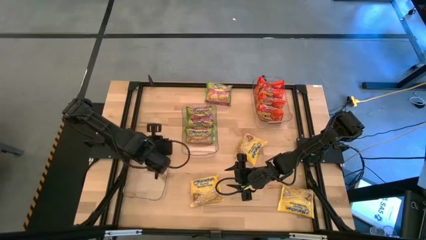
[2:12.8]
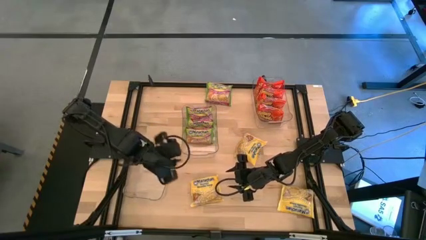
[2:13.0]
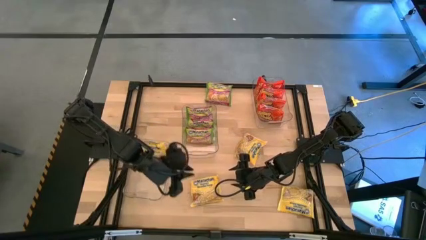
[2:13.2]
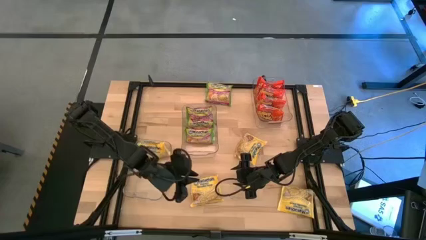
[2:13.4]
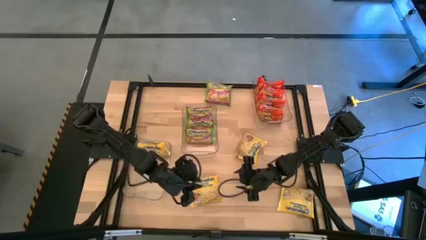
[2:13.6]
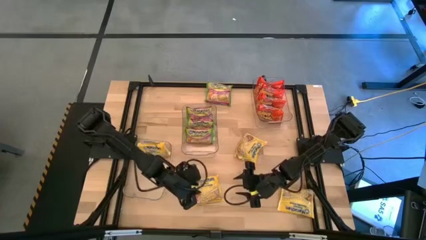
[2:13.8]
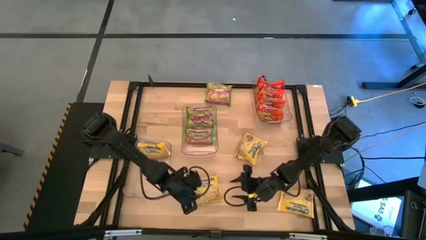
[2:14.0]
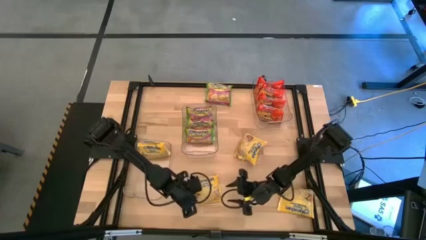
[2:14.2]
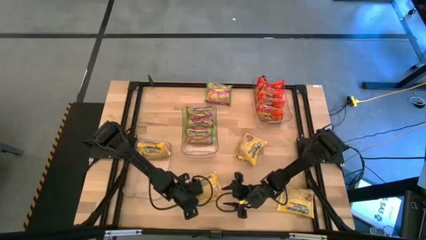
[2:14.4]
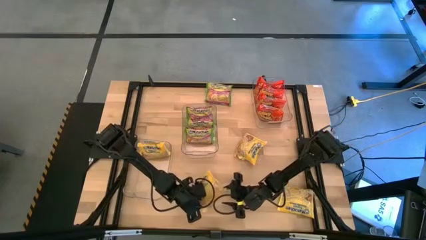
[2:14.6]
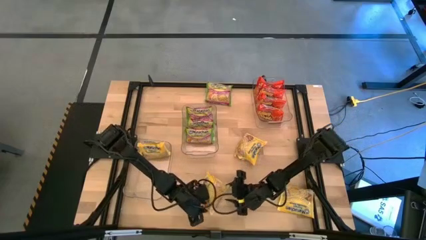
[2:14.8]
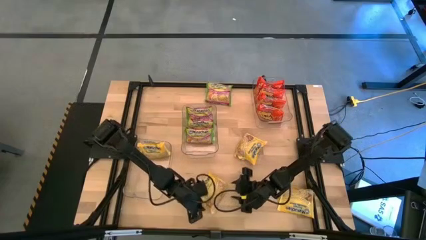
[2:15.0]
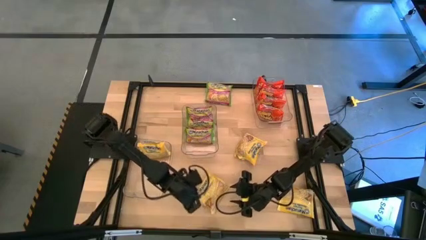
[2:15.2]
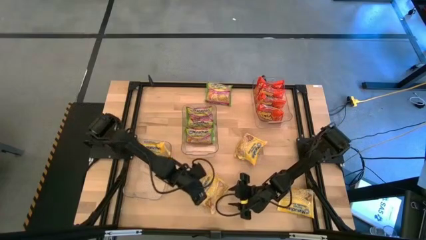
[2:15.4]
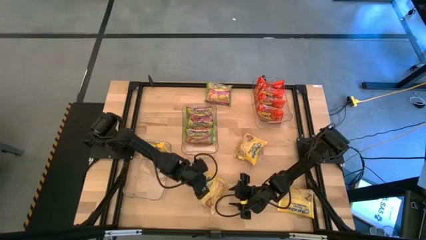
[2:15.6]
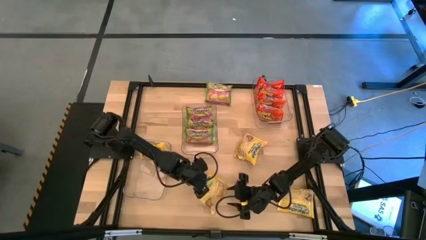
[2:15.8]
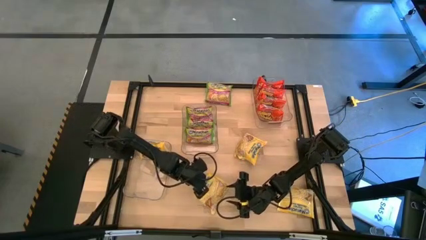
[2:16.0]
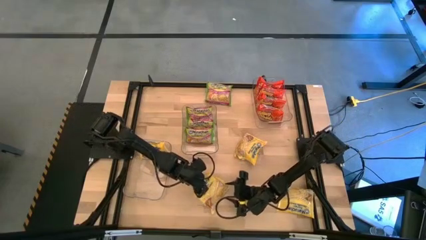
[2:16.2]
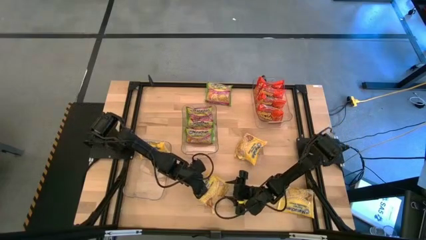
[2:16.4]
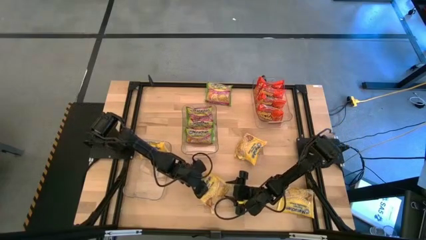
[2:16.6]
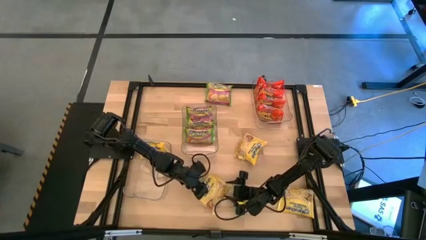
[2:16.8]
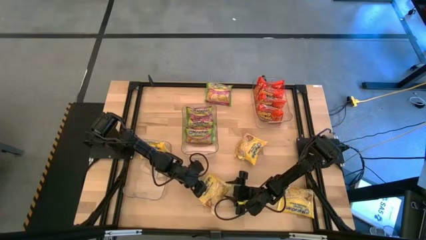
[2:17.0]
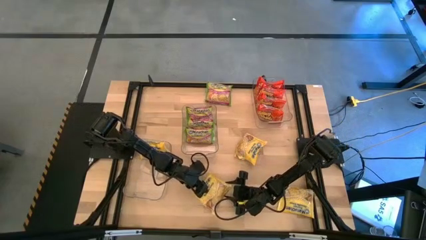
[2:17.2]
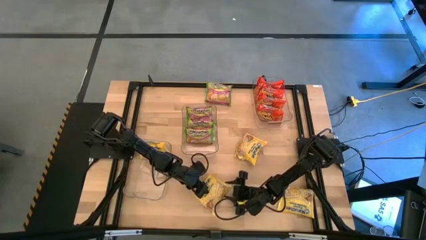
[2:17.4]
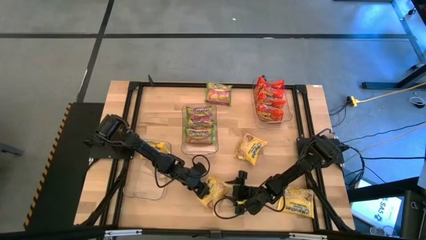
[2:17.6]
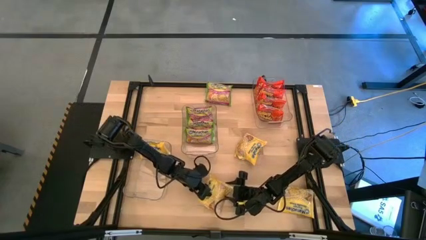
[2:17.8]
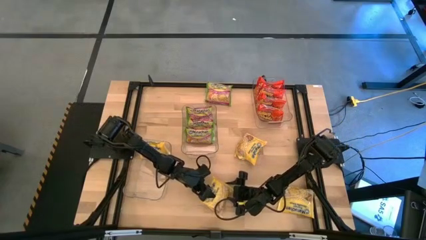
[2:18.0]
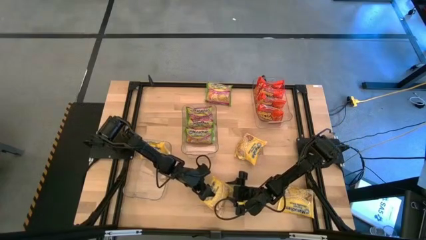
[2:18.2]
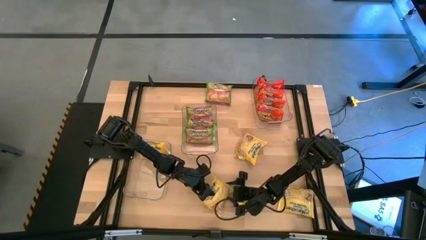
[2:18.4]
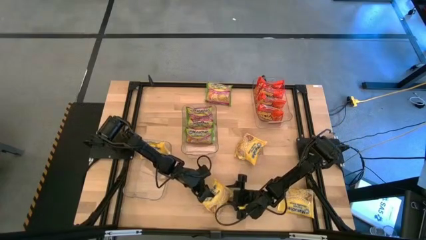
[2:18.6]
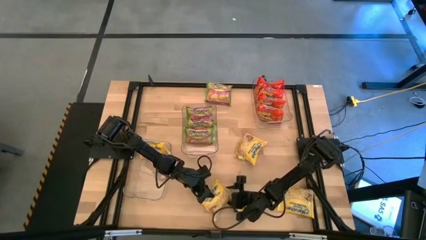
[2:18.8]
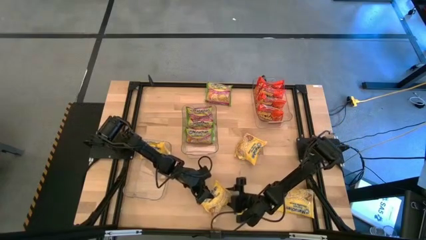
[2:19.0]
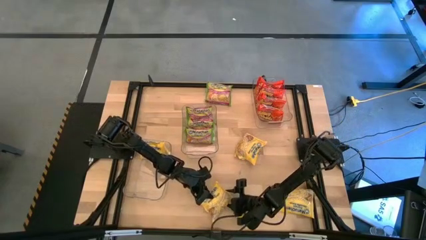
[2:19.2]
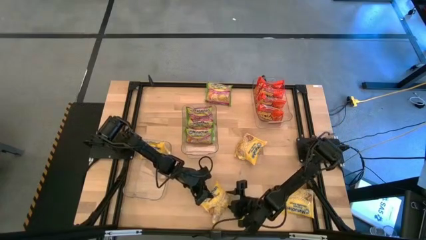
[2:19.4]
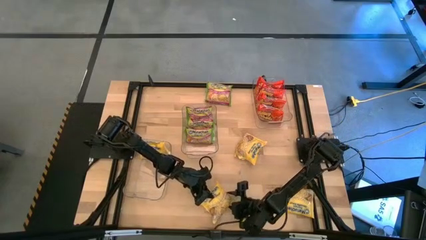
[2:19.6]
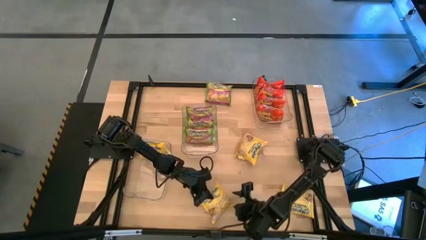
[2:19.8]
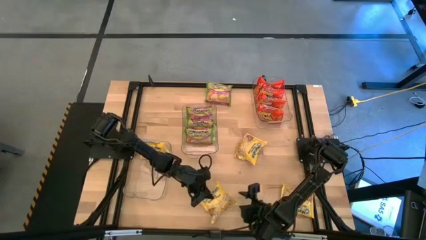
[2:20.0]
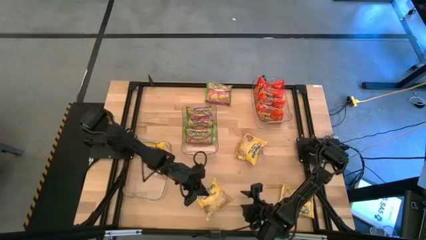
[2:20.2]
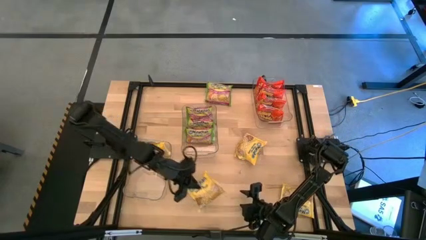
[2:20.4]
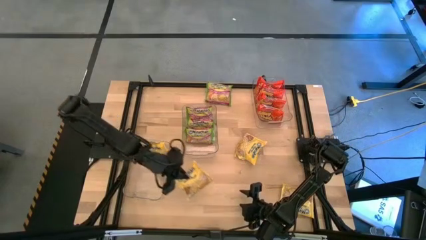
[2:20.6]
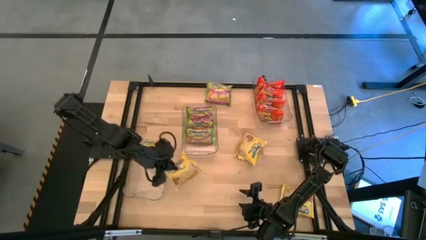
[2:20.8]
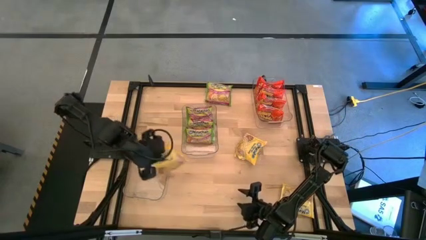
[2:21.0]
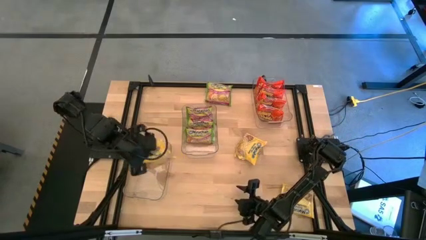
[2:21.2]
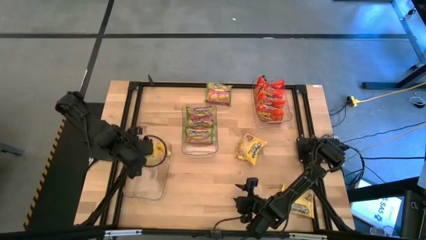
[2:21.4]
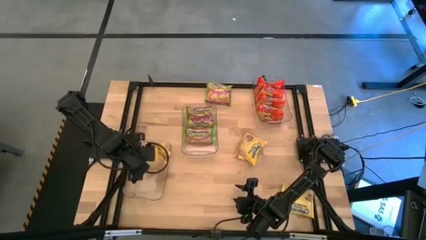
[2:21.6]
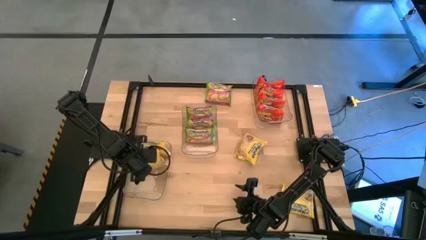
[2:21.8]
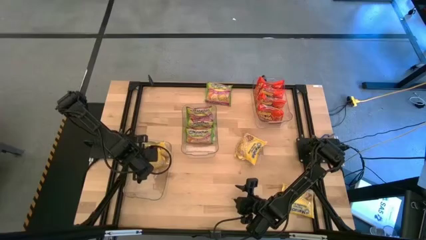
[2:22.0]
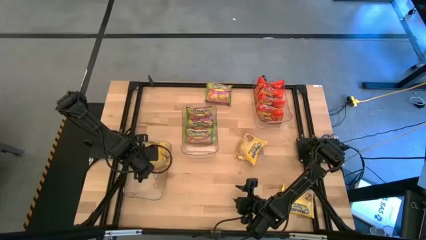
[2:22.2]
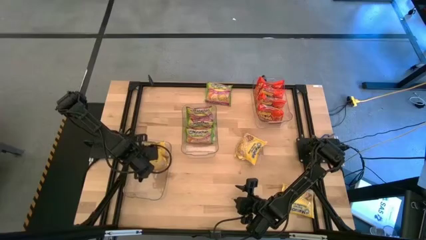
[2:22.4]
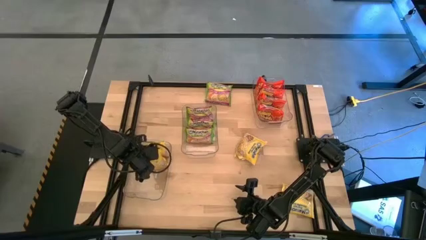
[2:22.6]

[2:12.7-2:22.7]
Task: Sort Maruchan noodles
Put the left yellow noodle pack into the bottom left transparent bin

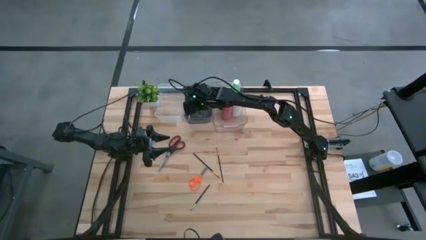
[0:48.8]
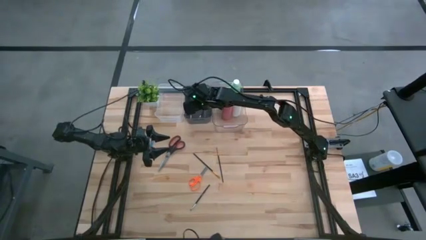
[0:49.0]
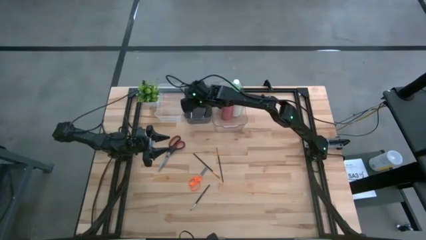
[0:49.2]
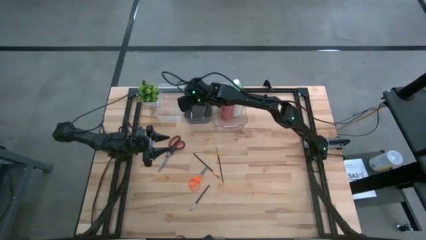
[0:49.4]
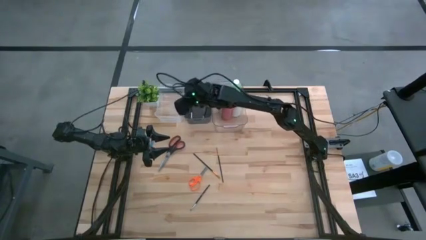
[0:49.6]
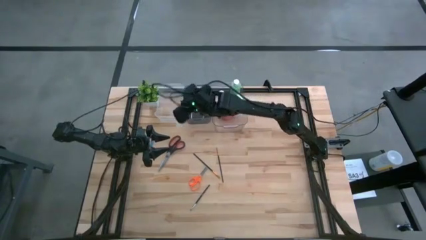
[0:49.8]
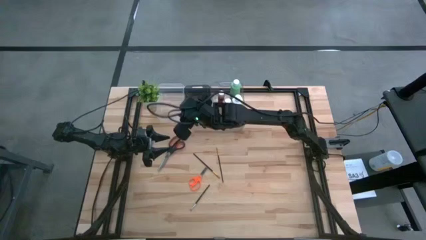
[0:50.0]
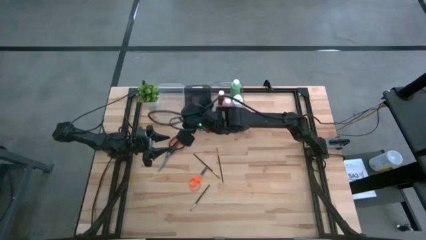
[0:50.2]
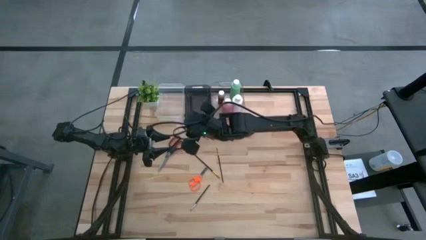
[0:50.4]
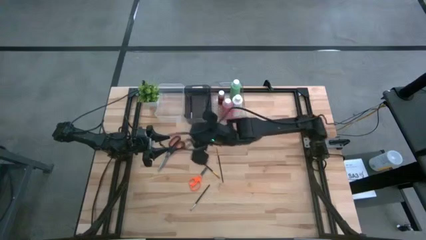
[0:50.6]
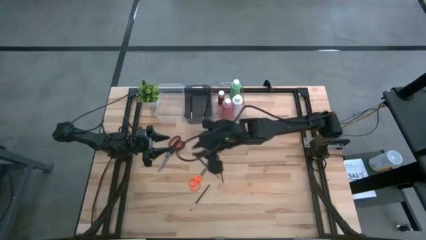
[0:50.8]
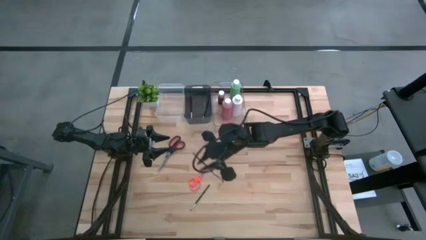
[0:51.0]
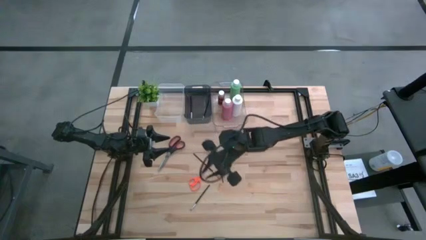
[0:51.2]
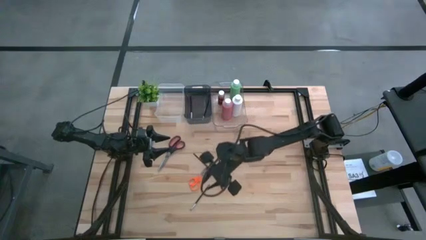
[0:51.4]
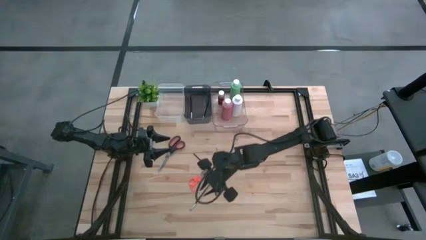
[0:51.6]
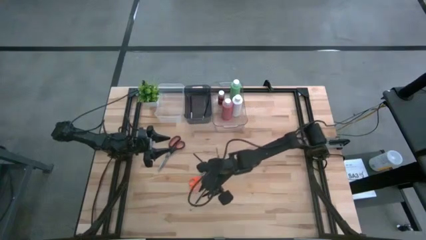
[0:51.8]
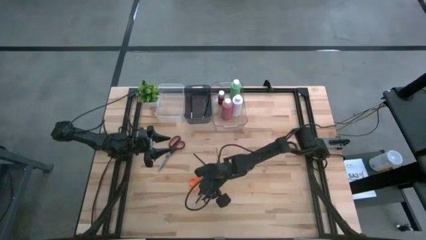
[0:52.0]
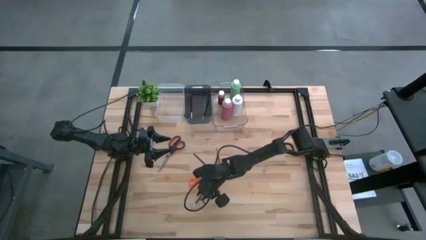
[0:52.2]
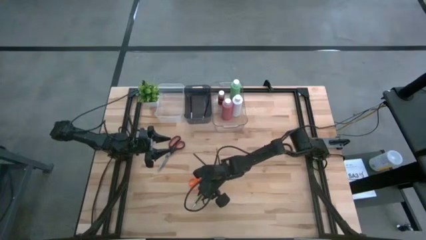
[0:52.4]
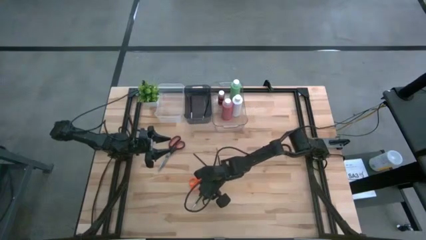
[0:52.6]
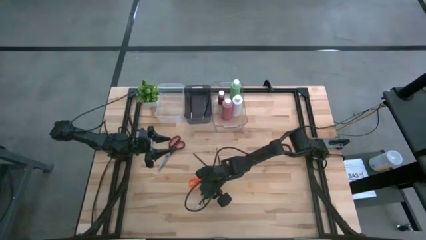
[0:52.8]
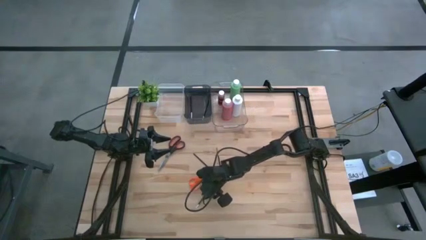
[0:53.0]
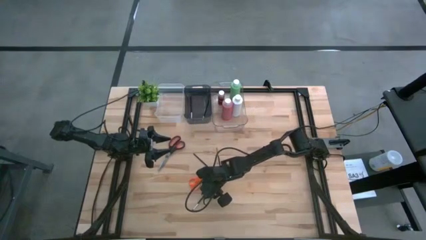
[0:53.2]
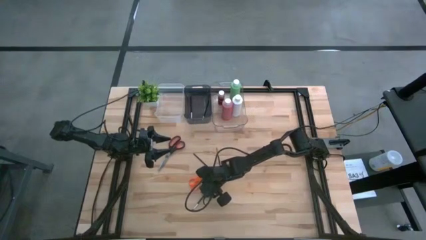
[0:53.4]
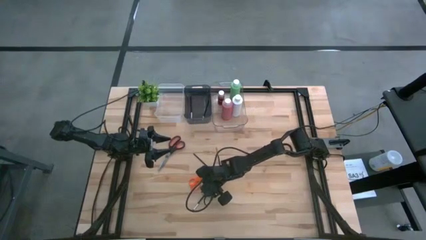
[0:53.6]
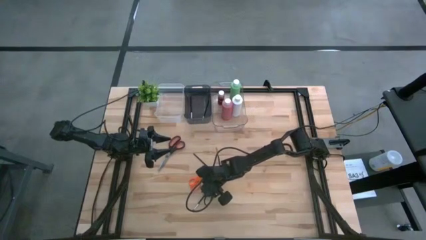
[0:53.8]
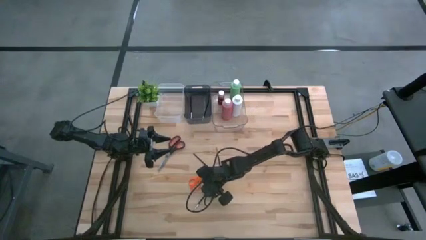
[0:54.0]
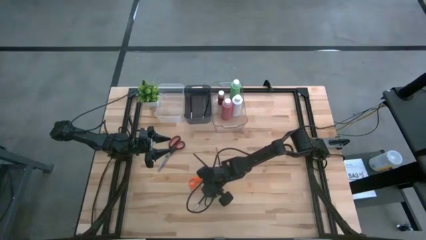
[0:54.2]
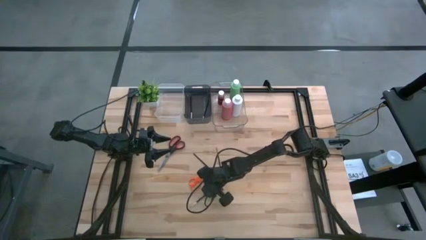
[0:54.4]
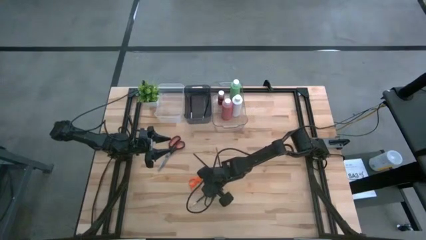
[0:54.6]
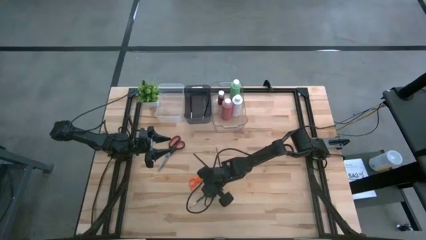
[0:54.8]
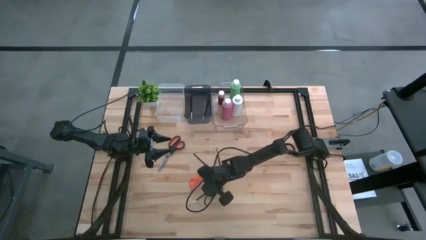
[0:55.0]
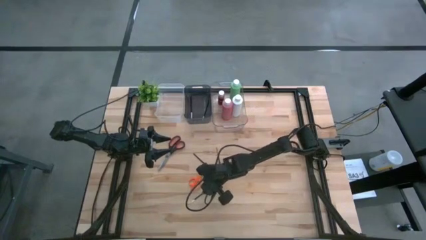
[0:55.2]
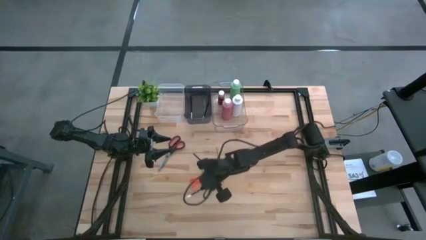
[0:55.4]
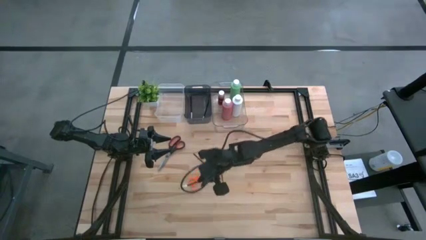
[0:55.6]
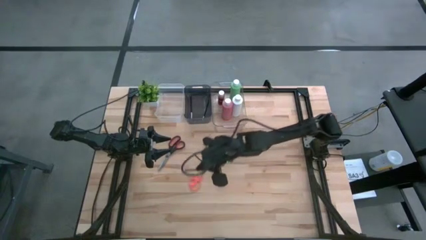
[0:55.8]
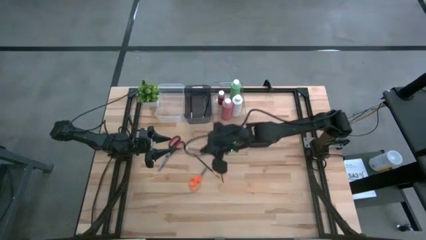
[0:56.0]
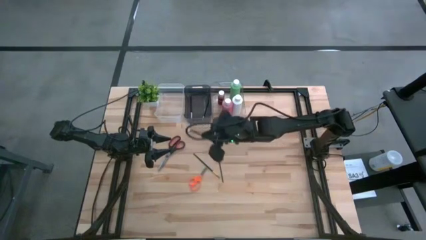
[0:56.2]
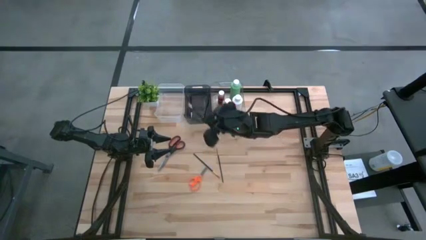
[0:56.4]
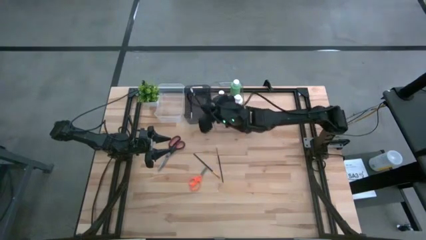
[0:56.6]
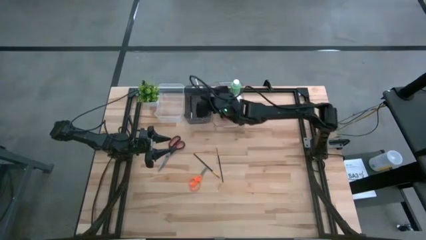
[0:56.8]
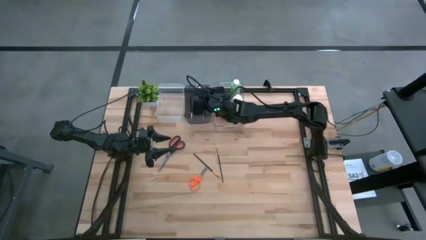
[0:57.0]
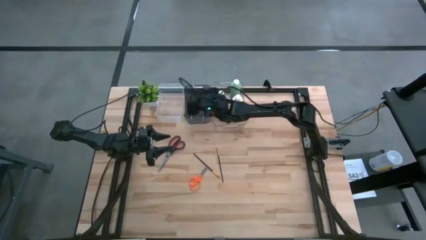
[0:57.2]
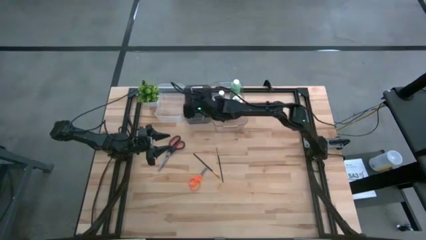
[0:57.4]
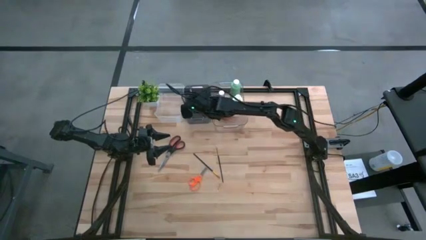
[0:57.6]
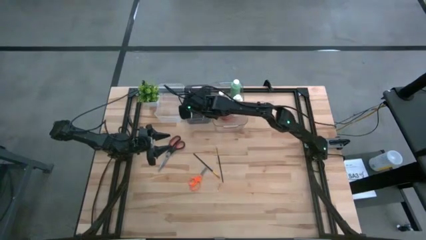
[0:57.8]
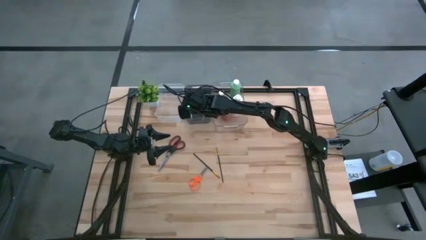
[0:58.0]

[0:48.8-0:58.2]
Task: Pick & Place Paint Supplies
Put the silver paintbrush into the black bin
